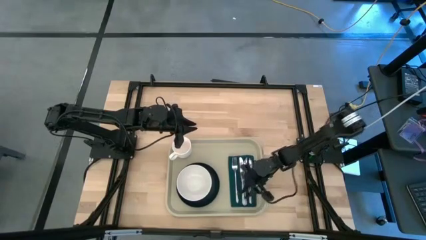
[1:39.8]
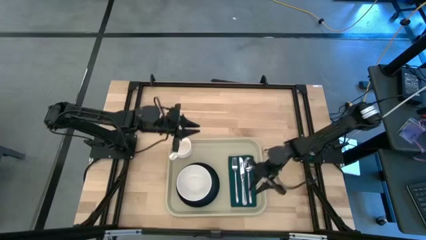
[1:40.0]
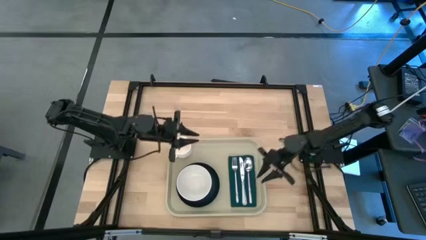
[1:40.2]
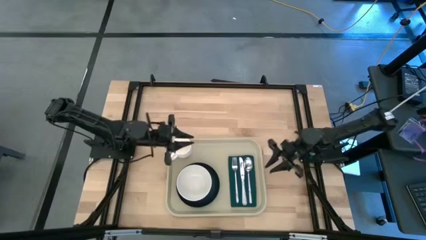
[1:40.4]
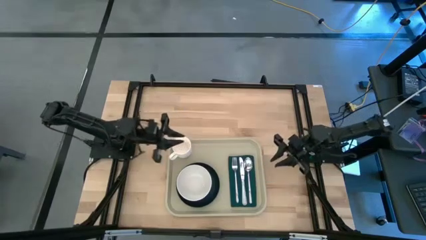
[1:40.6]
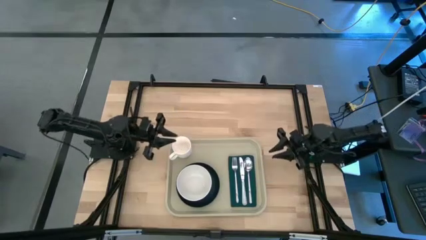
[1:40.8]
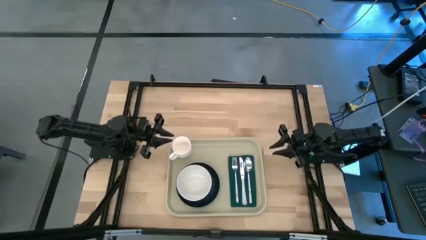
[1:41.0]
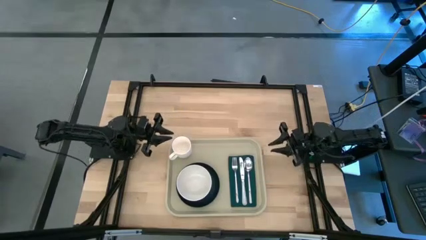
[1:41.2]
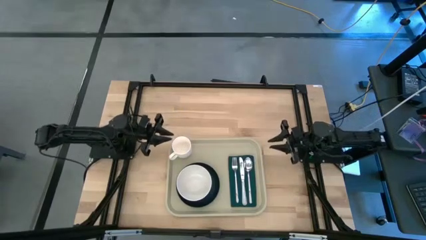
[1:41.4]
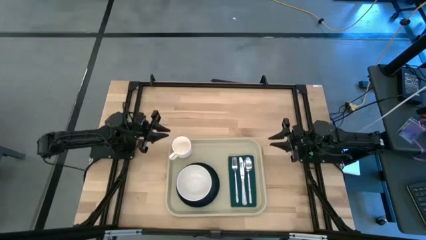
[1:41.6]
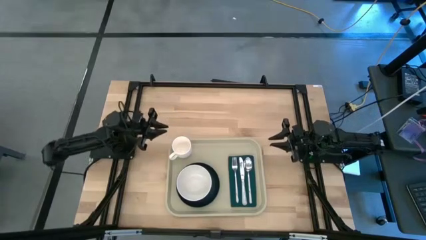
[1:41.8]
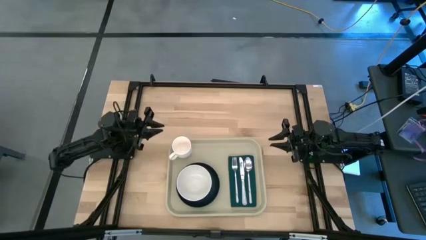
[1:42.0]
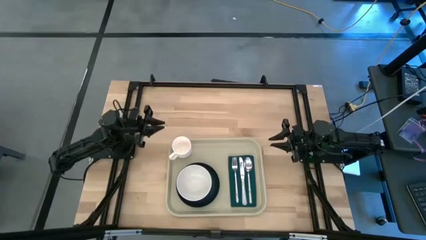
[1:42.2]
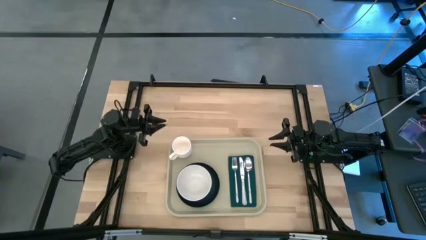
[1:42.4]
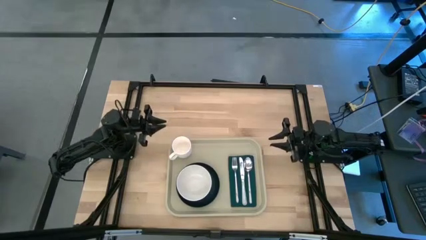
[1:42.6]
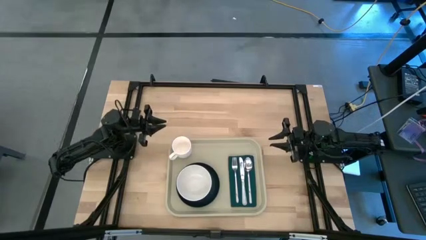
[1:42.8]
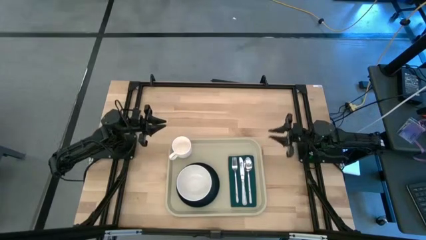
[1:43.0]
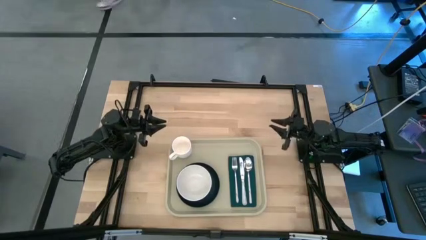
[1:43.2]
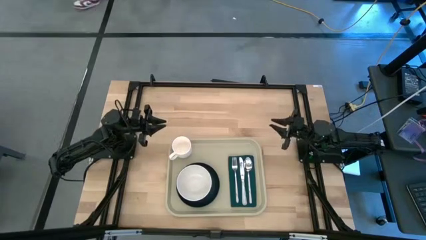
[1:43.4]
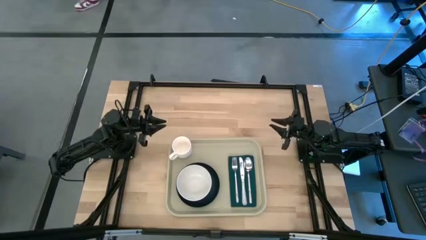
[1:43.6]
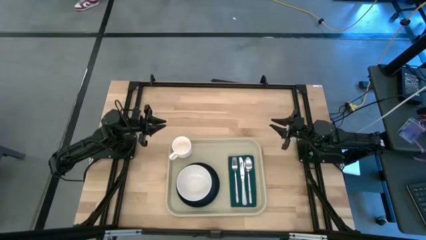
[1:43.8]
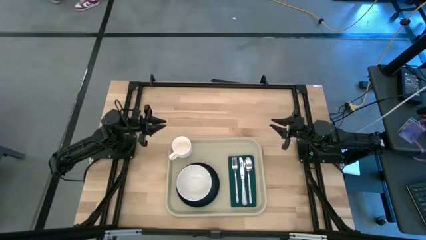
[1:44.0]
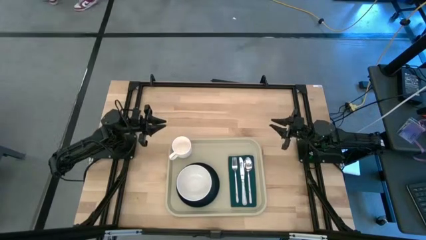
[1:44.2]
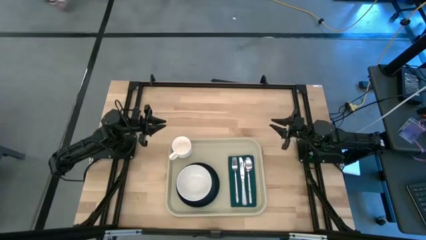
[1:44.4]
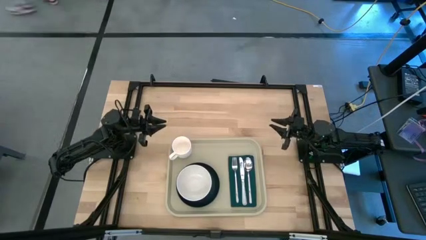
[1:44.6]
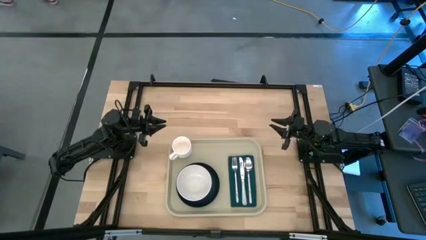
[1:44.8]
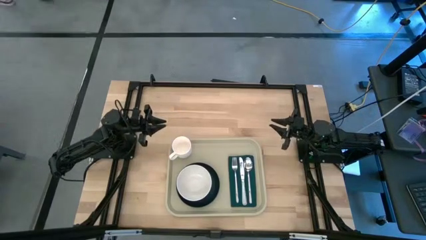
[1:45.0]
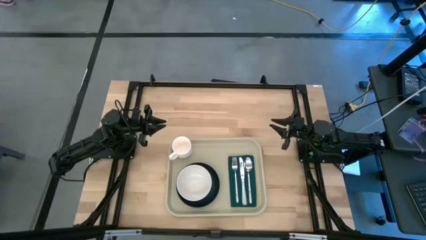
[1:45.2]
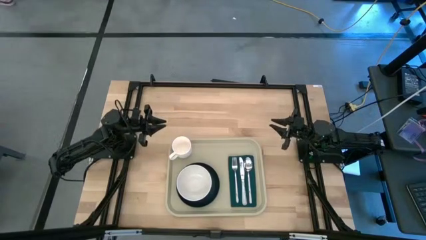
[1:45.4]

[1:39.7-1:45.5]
Task: Set up tray
Return to Home Position

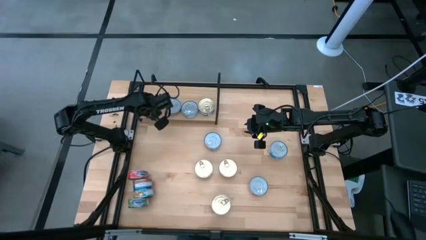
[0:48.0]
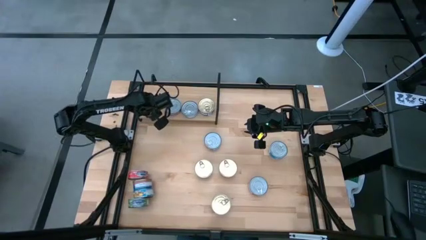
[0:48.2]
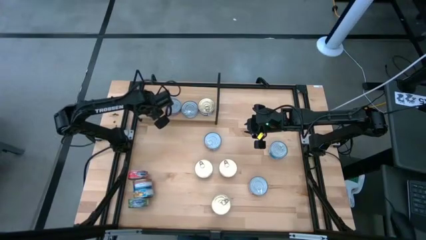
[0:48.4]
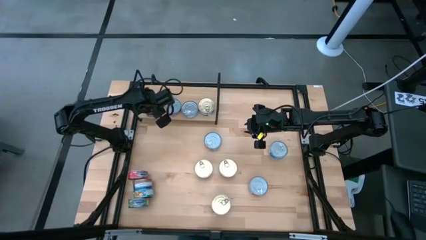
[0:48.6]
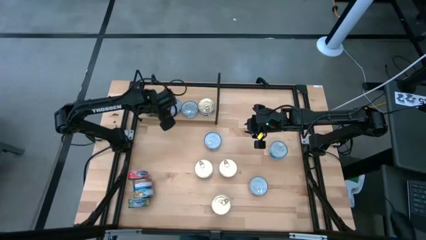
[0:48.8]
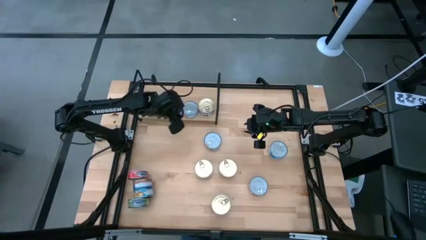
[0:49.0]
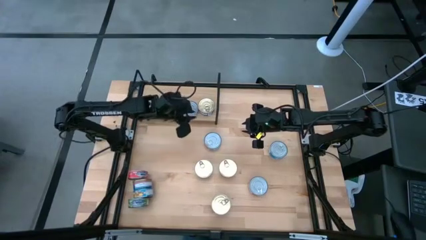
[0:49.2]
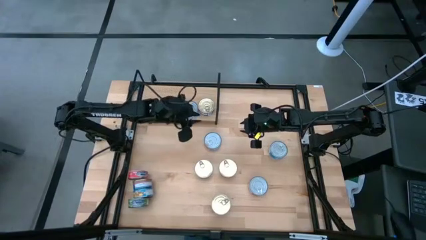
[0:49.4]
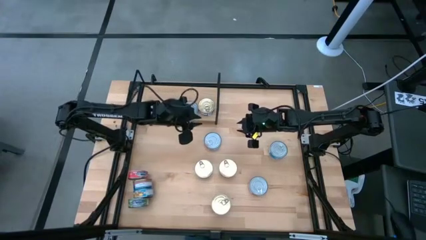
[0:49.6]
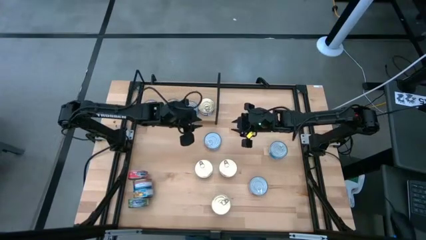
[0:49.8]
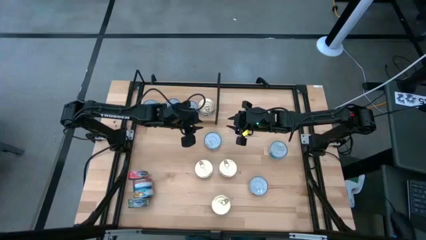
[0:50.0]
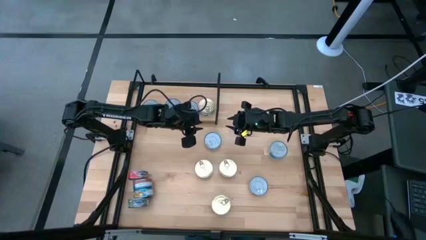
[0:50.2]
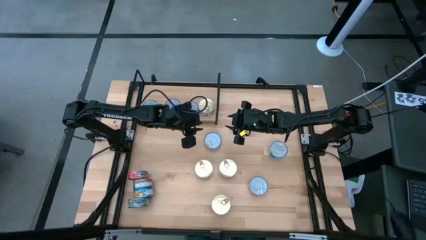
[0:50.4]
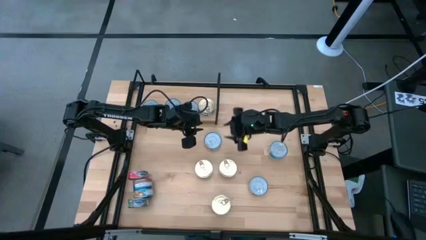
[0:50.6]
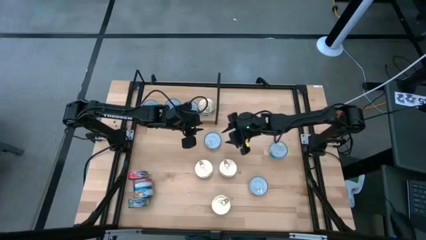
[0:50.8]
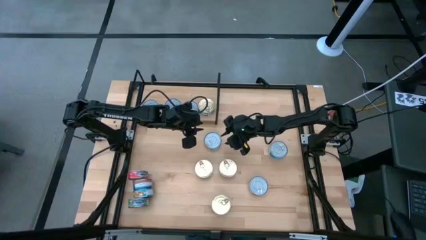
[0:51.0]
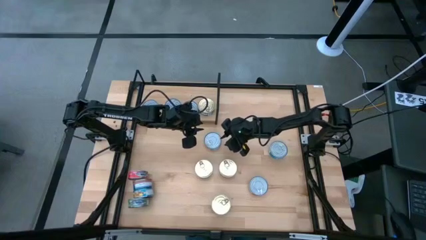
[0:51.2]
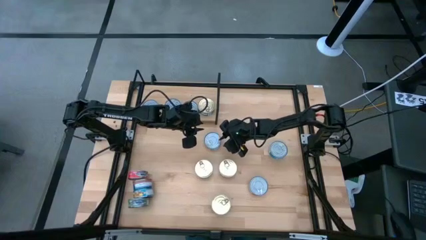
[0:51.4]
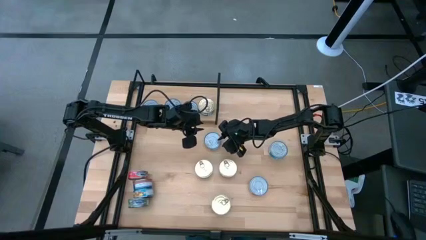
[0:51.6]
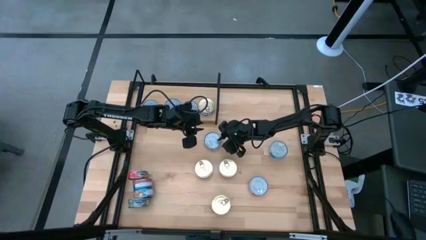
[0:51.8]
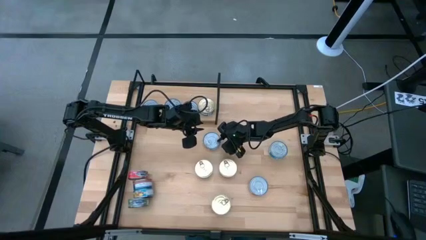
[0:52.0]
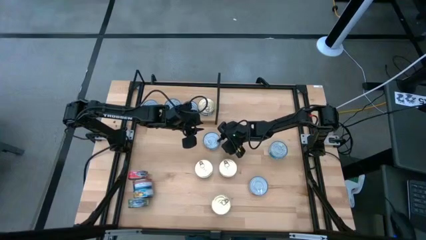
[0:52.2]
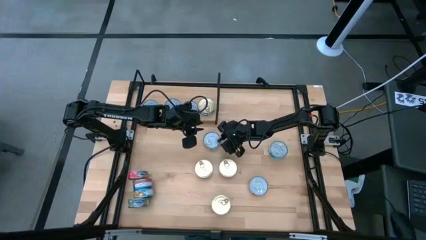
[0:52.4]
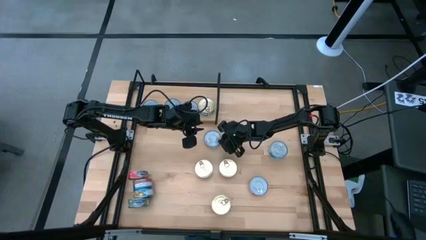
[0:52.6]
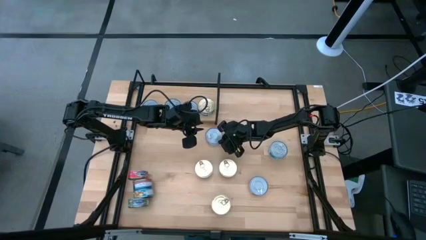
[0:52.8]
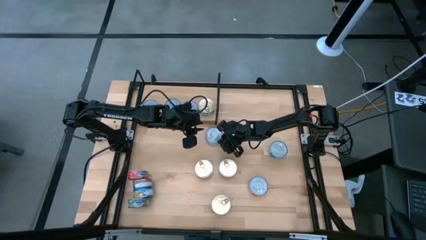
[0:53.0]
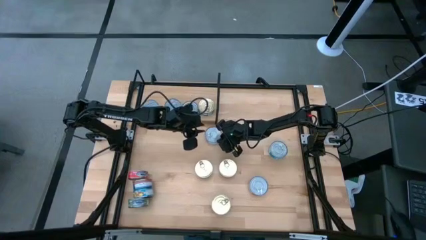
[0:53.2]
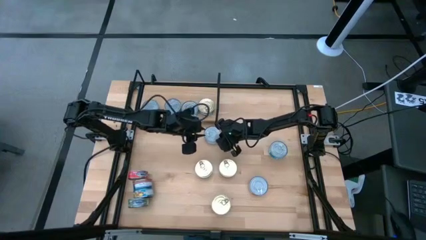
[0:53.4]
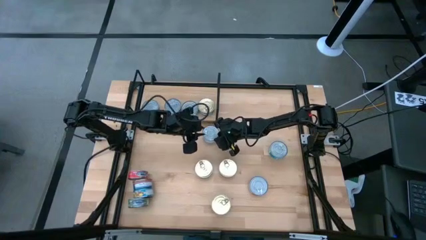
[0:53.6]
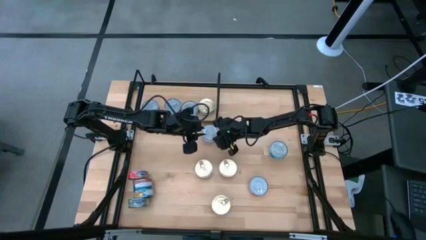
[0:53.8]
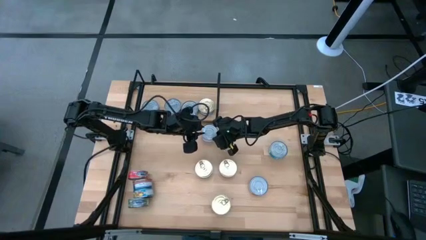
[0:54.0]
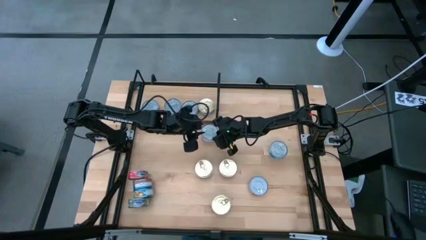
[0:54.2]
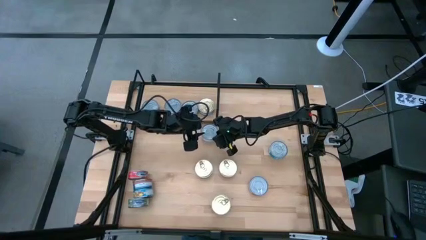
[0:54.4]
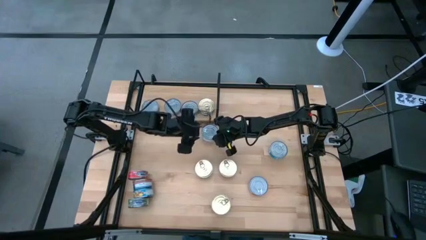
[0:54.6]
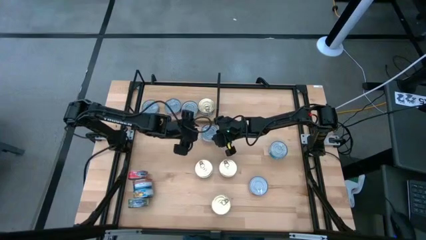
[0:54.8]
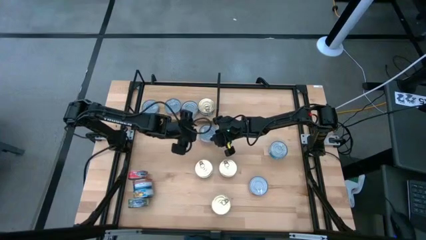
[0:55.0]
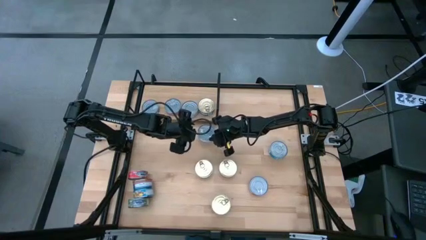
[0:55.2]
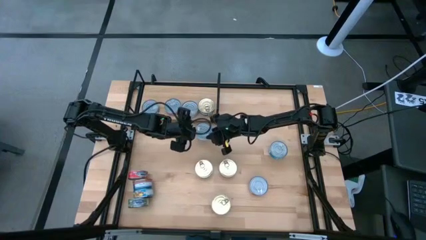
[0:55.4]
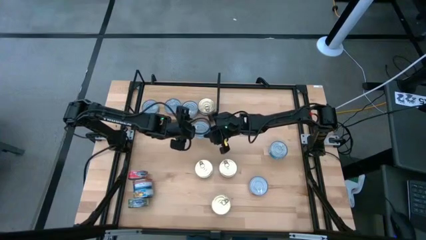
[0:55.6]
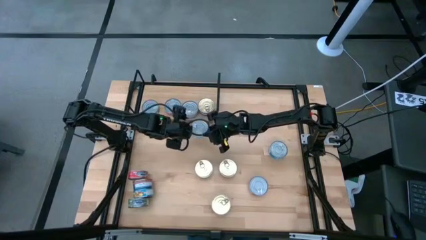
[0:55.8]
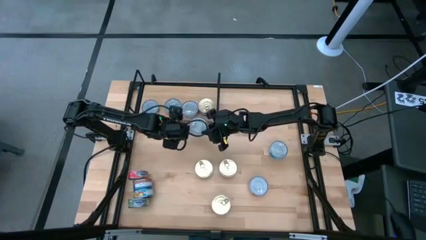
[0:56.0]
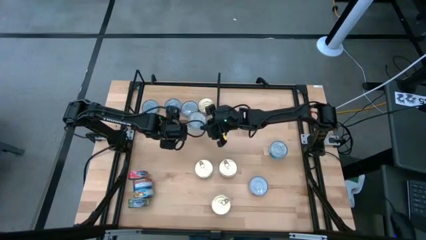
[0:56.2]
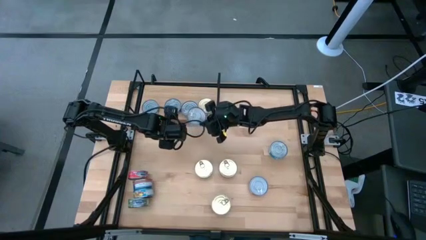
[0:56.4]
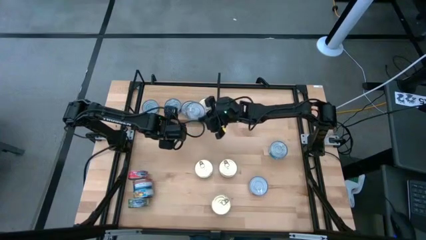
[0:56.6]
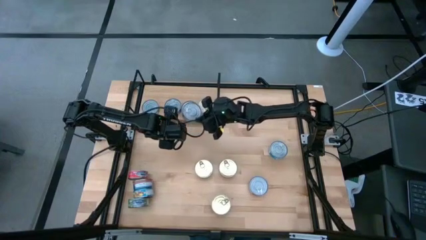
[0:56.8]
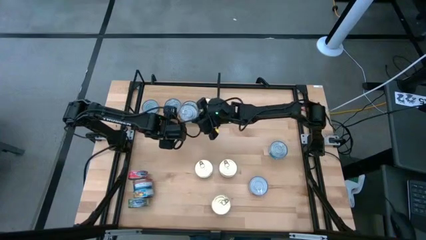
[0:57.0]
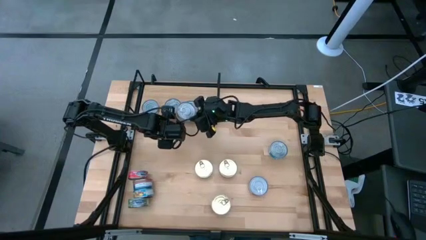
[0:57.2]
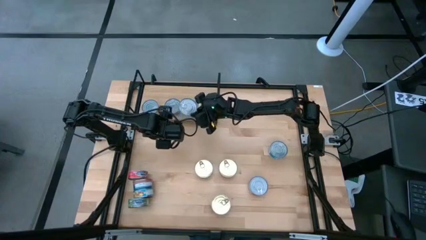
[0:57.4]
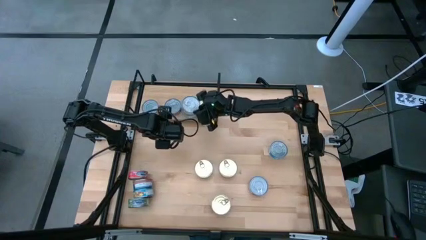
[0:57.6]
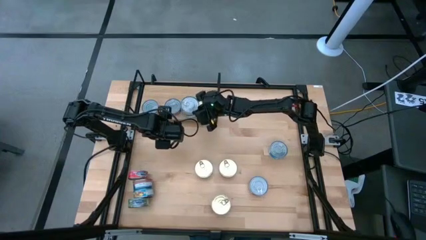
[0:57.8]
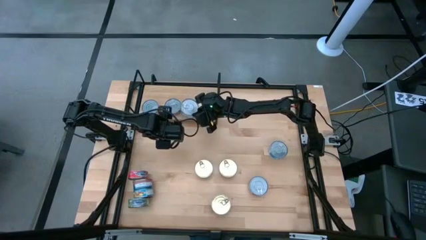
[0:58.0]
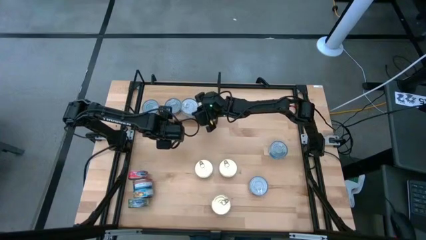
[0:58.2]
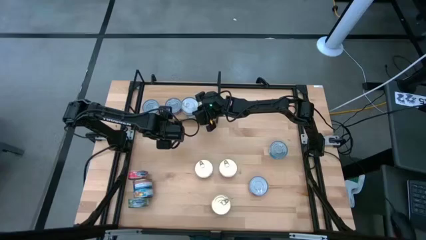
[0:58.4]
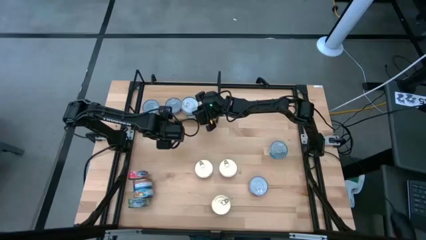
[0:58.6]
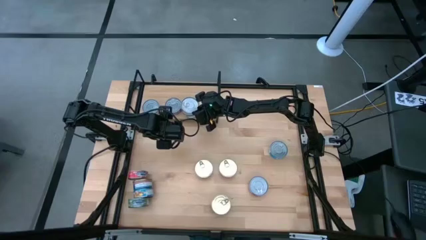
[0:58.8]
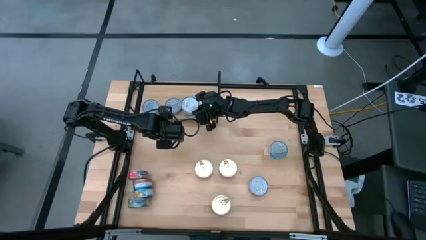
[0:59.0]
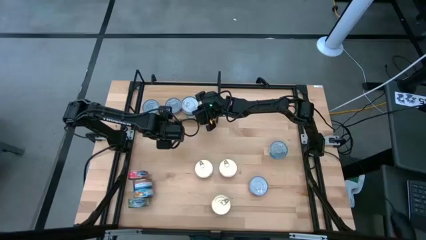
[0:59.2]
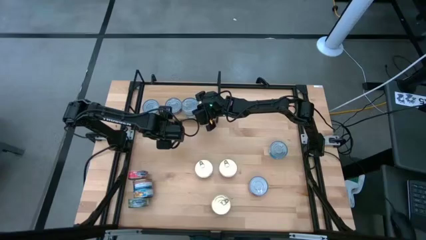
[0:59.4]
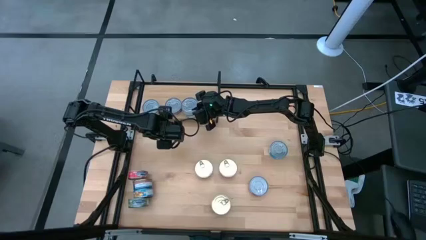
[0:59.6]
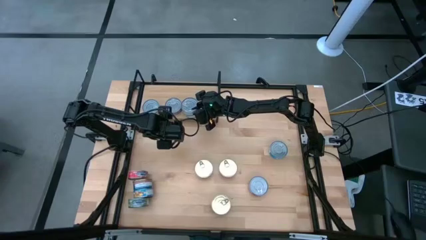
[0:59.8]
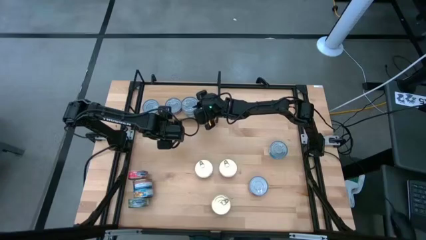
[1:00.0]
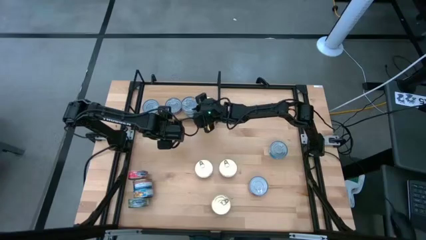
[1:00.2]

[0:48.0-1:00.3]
Task: Stack canned seafood by type on shelf
Stack the yellow blue tuna can on top of the yellow blue tuna can on the shelf
